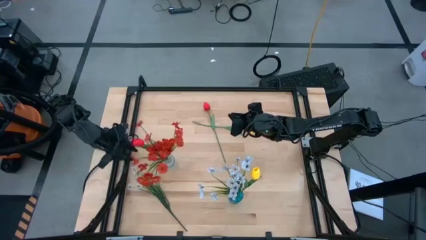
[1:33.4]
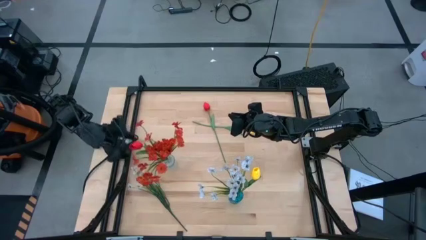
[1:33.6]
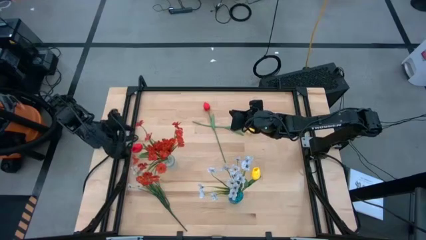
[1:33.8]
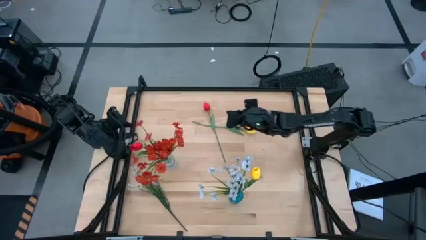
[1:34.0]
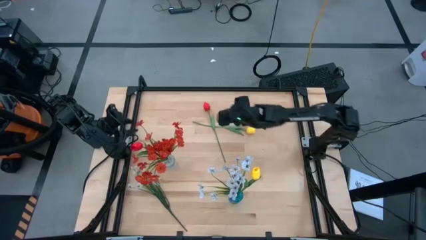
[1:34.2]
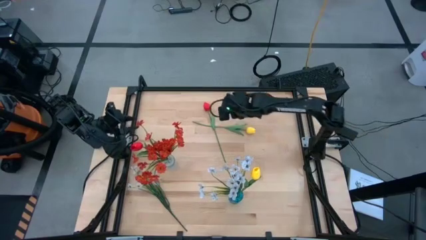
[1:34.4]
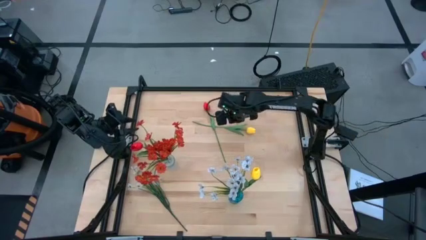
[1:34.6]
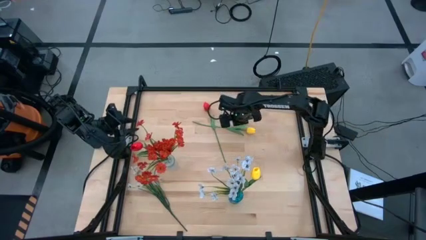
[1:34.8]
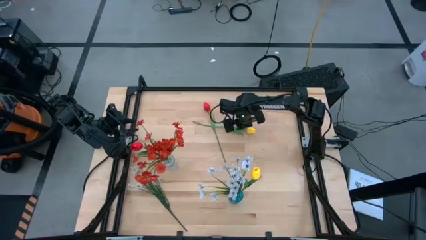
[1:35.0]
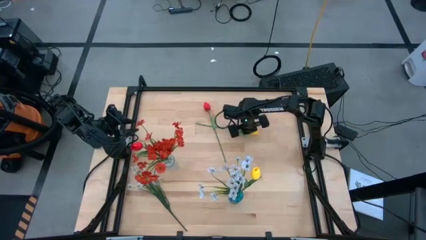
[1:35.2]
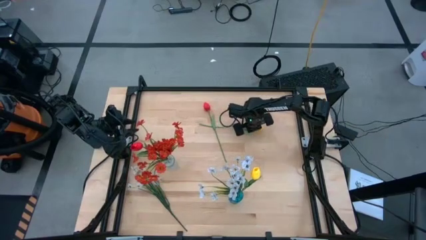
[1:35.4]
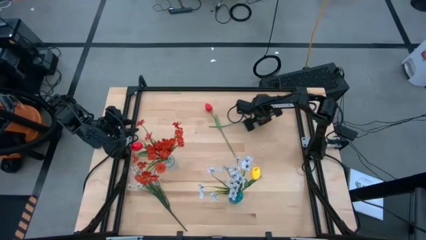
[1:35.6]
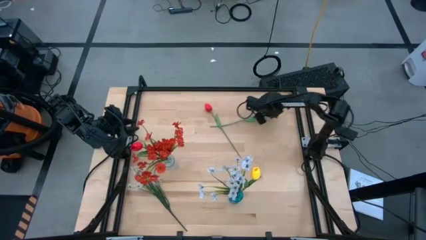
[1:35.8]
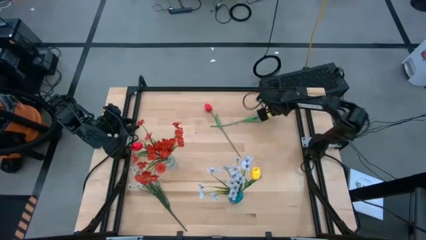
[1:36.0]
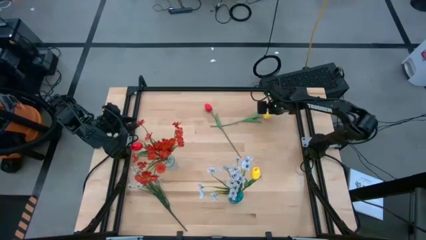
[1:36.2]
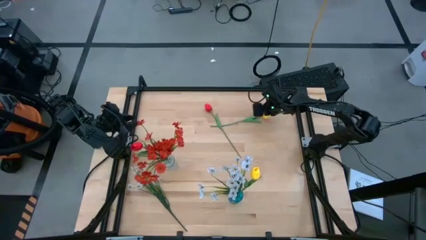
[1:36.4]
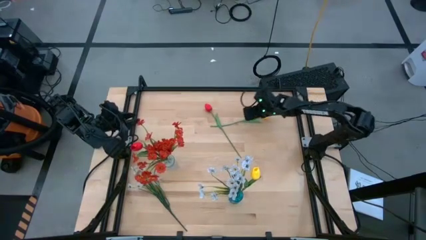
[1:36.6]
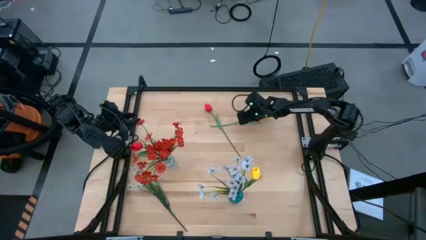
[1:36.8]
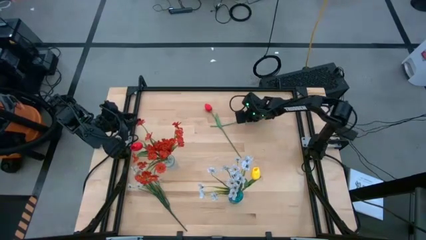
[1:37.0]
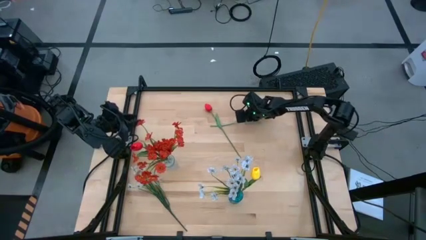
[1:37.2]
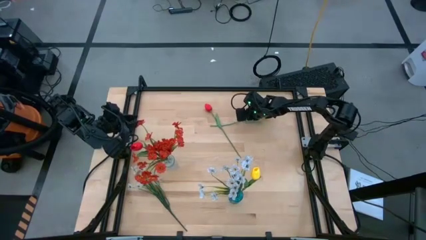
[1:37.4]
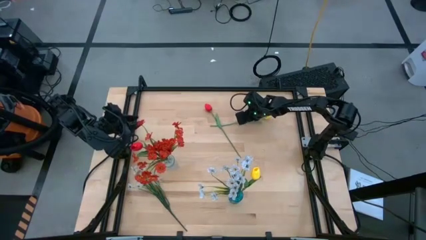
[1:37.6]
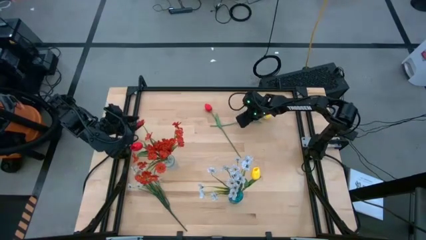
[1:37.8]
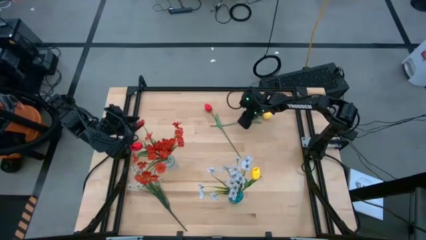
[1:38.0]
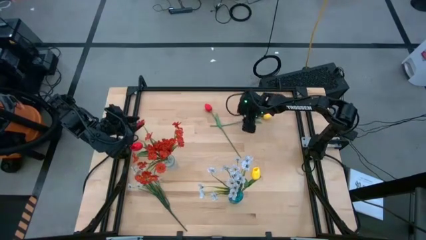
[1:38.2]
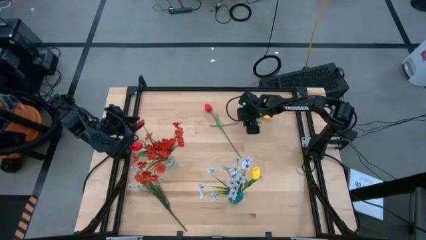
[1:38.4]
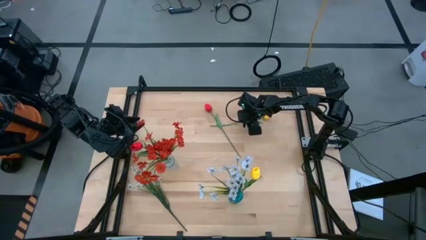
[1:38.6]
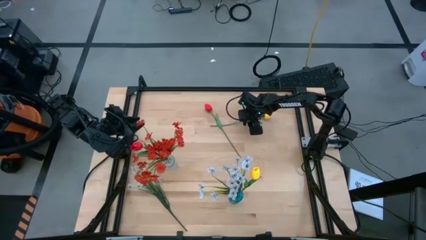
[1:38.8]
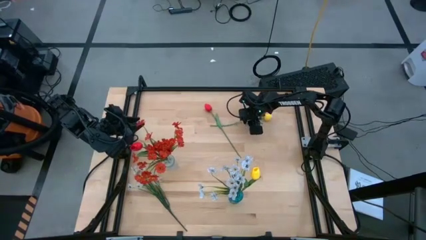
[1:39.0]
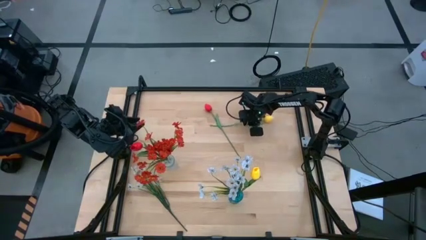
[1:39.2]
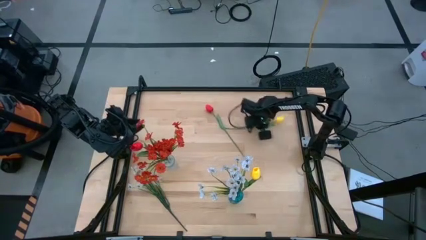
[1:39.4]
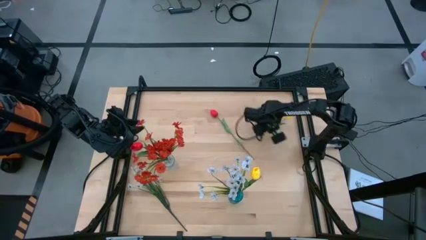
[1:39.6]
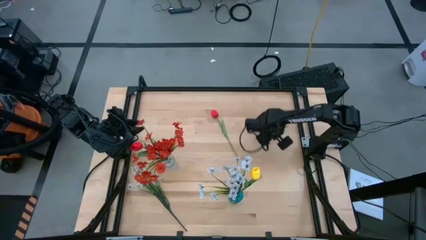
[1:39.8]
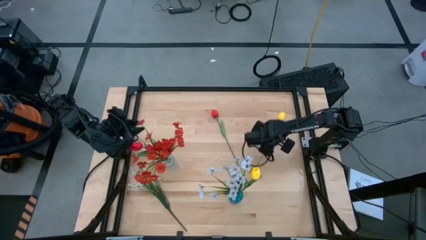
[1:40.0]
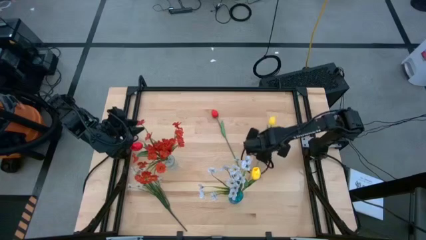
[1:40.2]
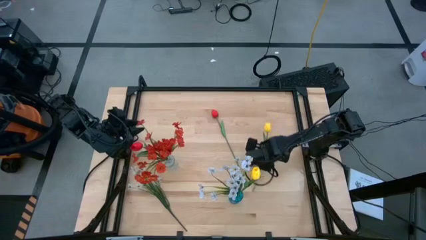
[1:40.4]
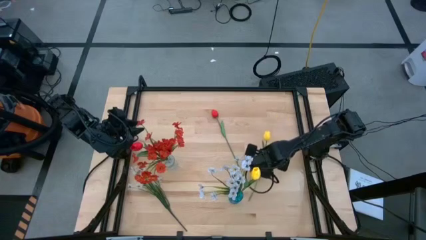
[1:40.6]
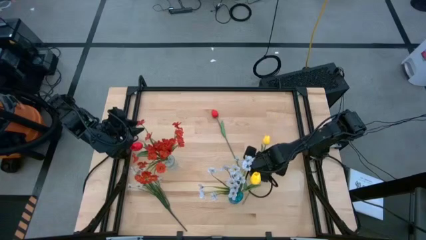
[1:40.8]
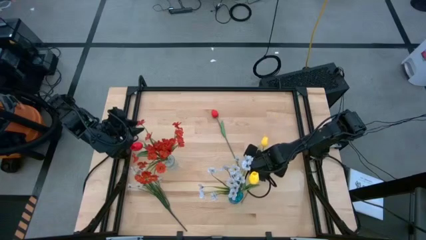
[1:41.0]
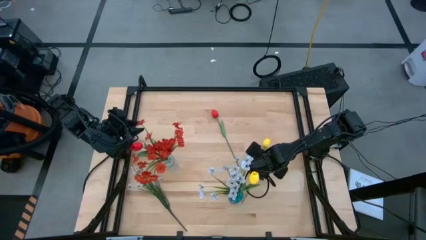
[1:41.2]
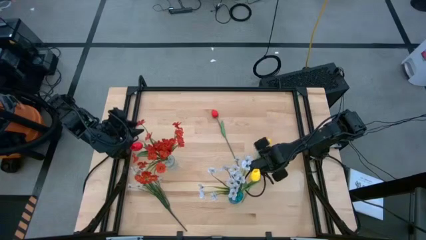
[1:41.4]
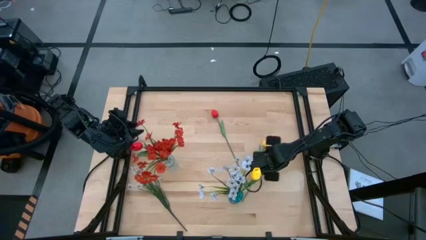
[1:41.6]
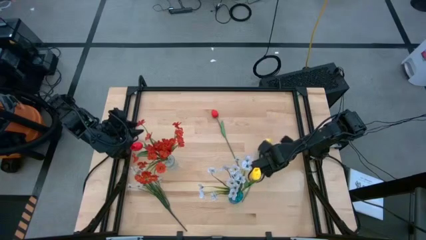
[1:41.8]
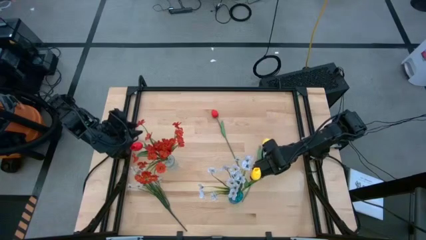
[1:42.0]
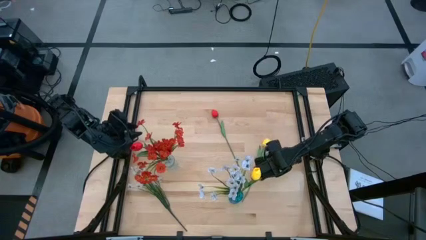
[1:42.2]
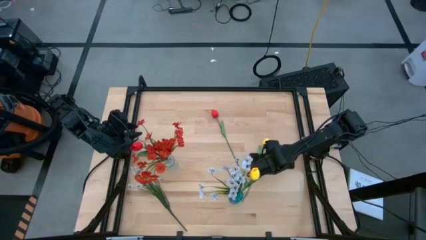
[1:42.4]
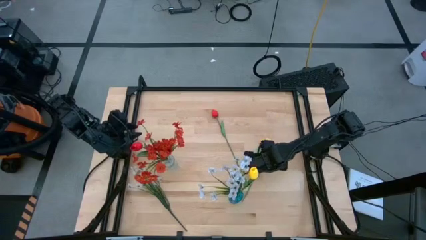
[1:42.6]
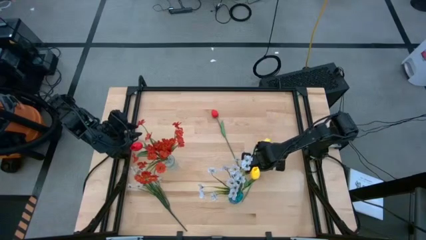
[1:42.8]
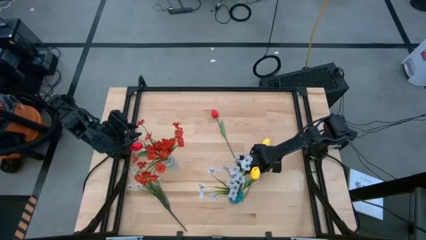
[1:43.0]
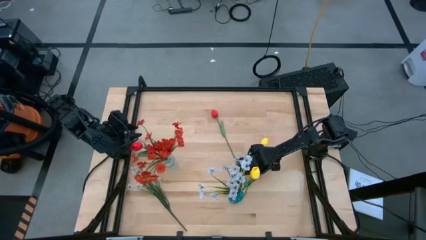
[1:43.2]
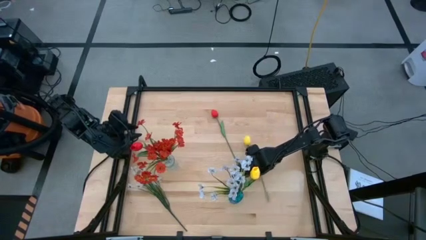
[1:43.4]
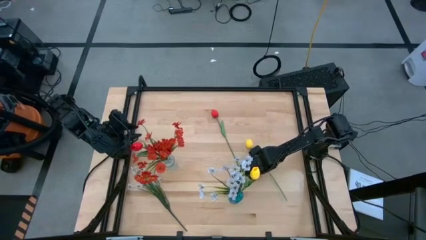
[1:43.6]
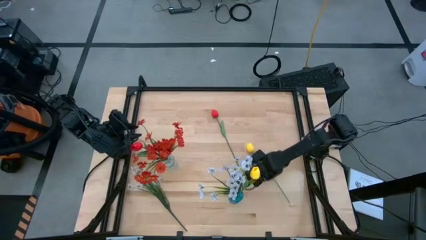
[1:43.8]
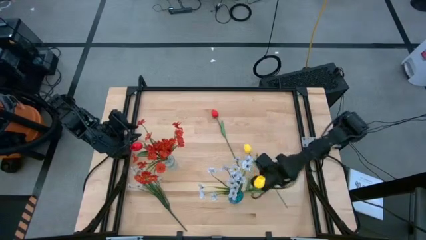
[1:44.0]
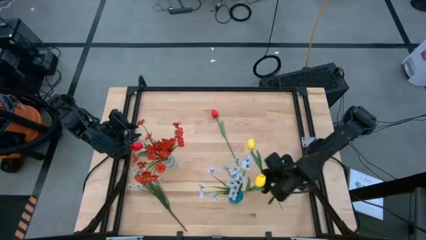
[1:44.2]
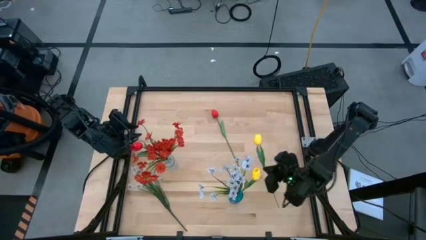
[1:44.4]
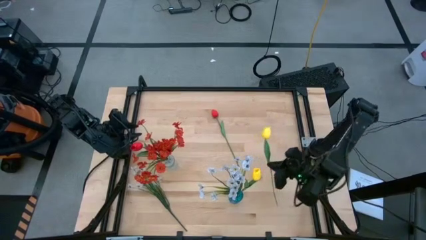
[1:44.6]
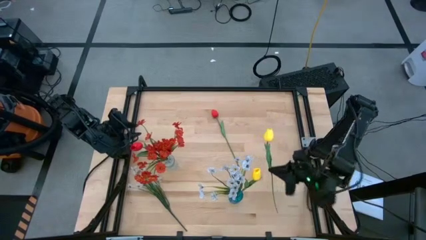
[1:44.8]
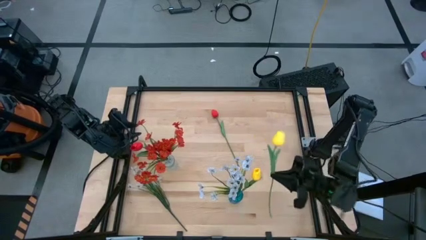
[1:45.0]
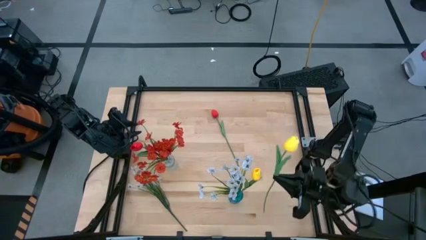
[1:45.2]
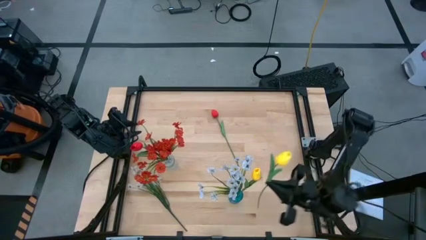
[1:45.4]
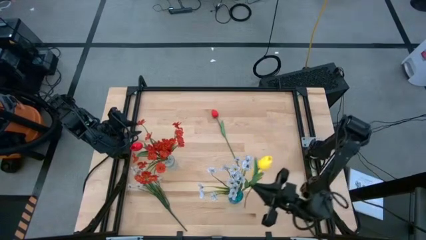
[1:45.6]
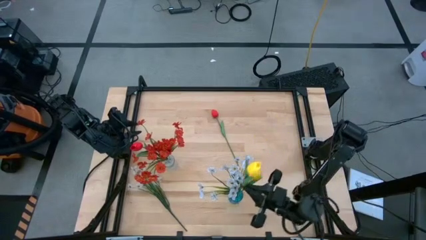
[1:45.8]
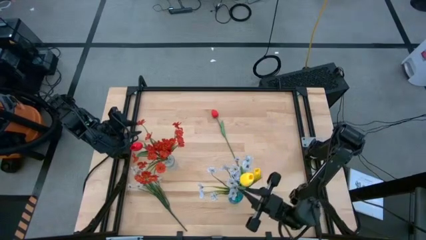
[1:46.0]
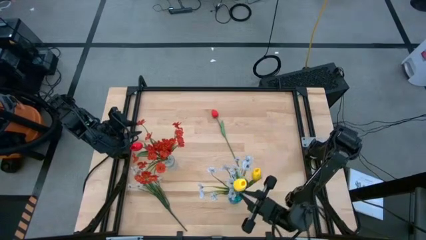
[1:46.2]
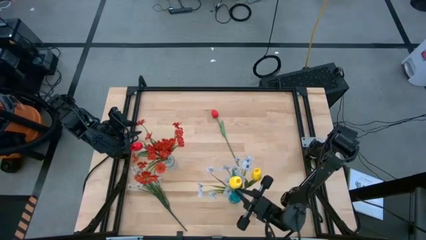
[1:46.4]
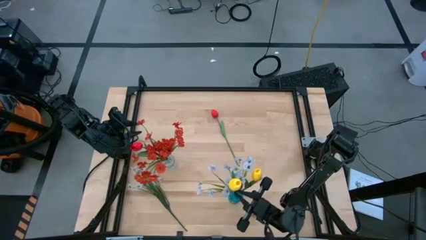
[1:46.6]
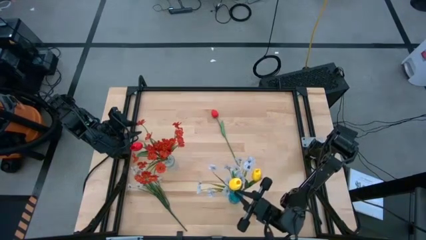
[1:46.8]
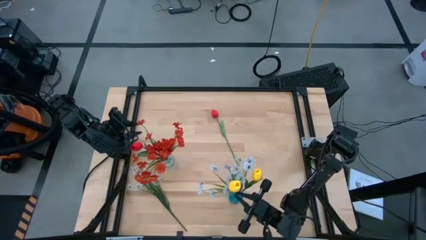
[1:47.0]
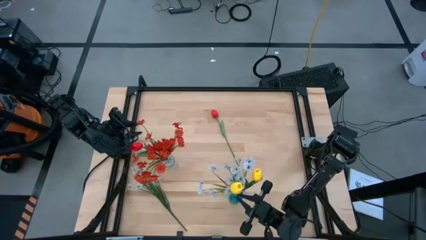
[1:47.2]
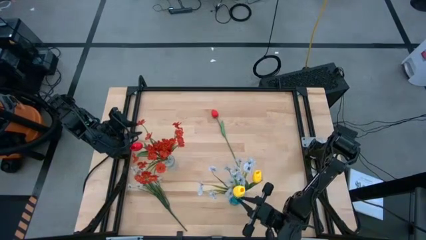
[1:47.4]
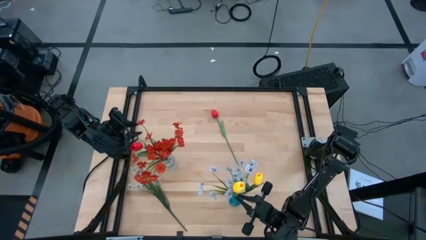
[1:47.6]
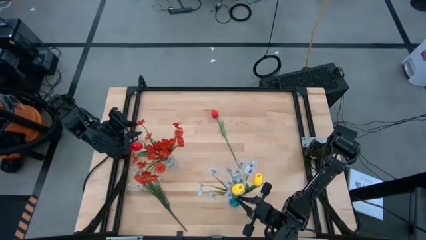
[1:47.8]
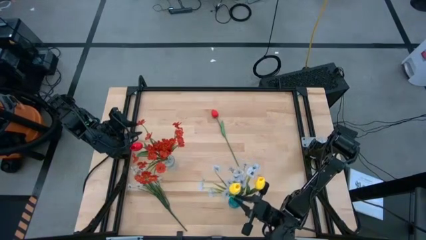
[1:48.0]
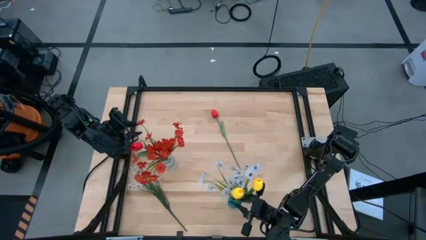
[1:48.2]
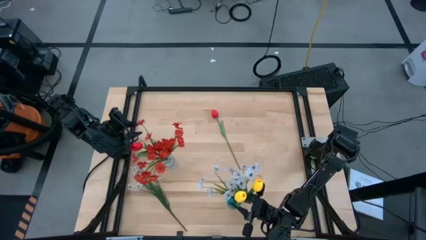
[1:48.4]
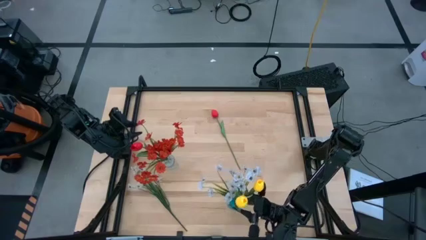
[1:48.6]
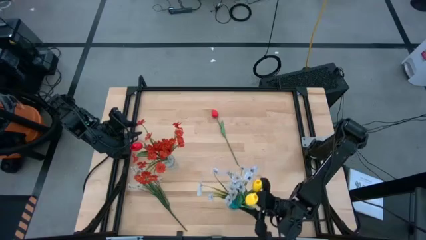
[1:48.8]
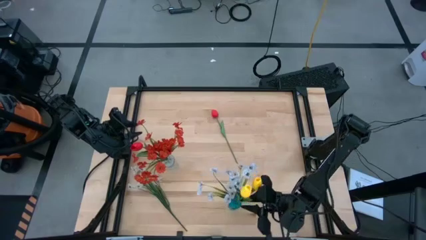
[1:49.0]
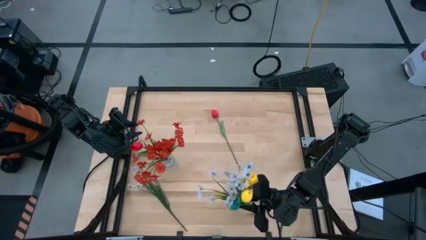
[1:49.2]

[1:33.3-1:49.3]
Task: Sort flowers into vase by color
Put the yellow tulip into the blue vase

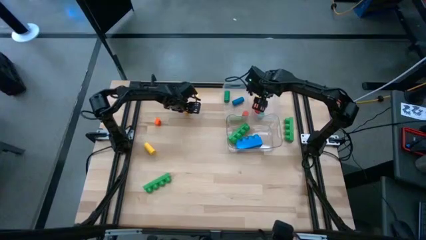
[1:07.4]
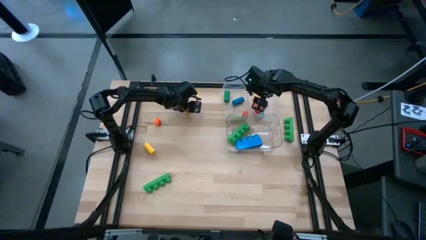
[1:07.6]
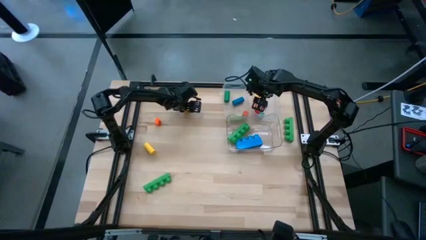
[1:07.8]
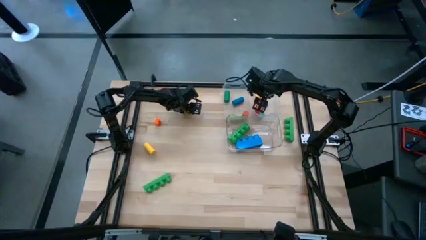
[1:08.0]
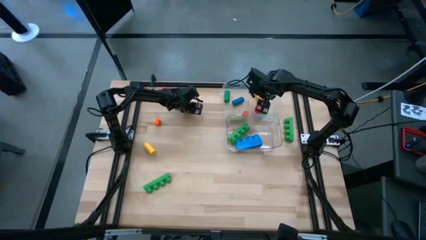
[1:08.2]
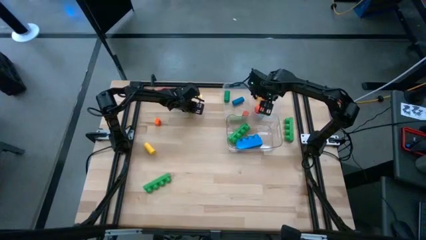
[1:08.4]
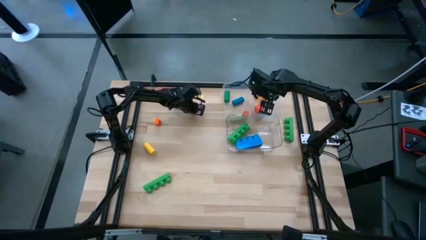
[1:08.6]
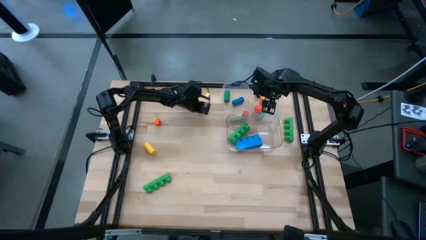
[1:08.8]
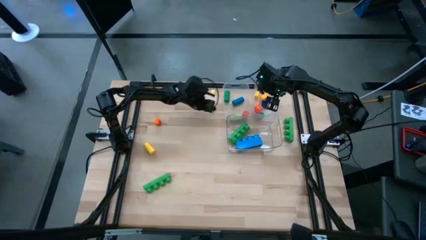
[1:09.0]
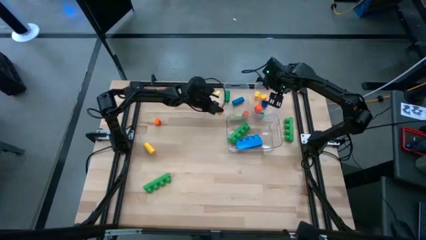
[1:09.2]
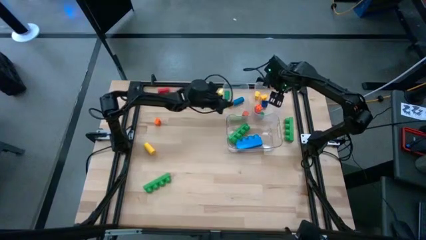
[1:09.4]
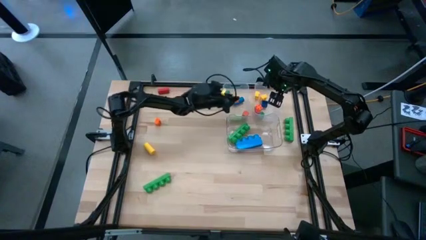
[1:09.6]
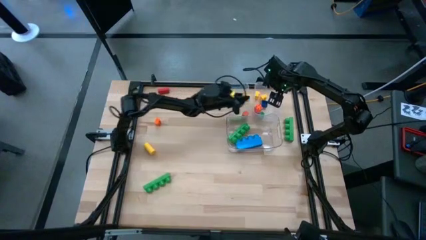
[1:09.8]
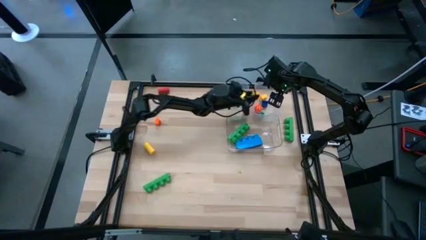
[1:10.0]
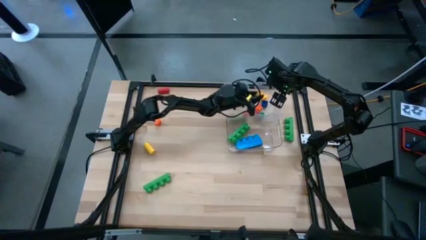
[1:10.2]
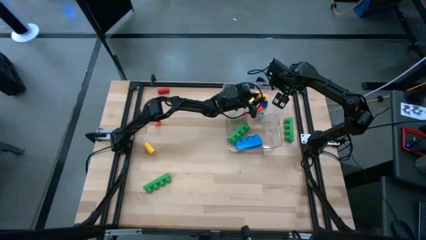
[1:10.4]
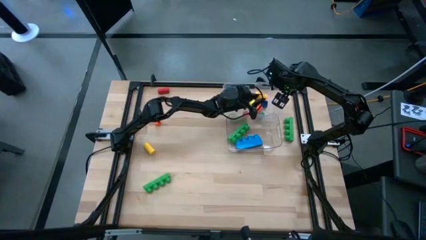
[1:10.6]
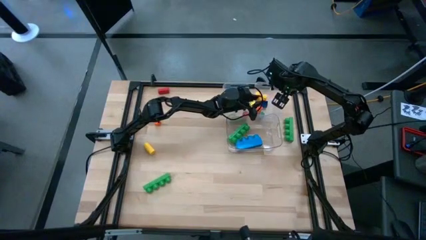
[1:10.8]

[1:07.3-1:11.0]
Task: Sort blocks by size
Put the small yellow 4 stud game piece into the right transparent bin
